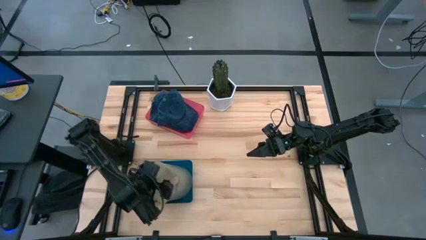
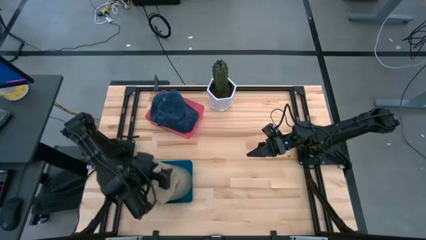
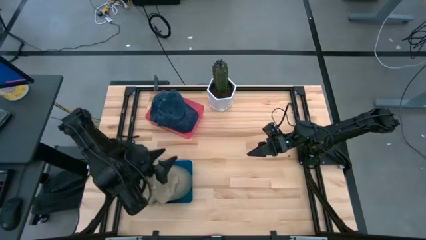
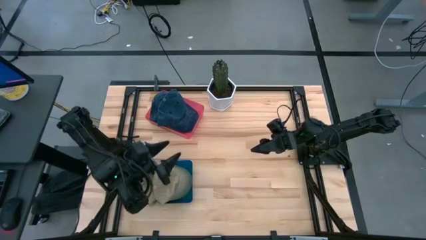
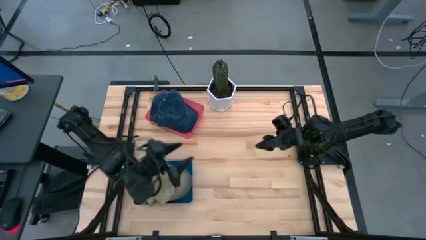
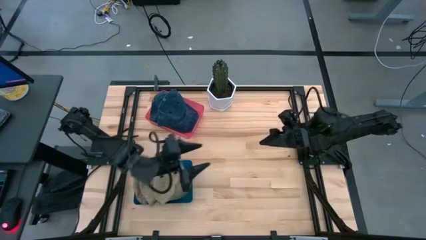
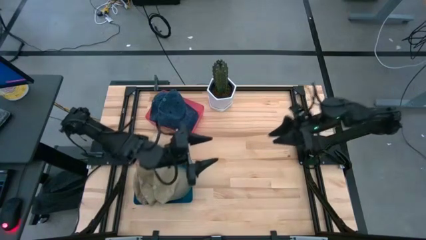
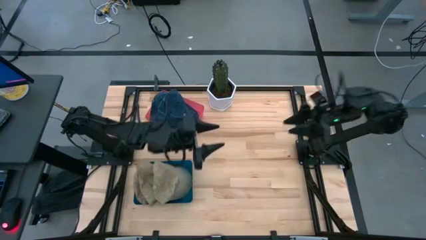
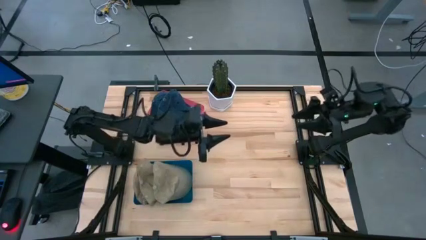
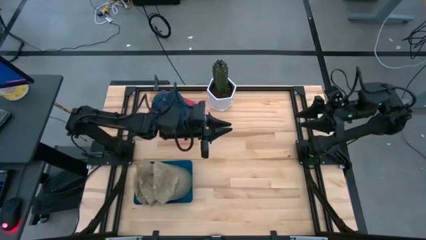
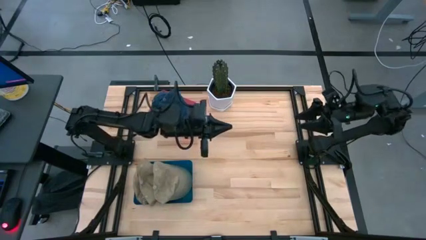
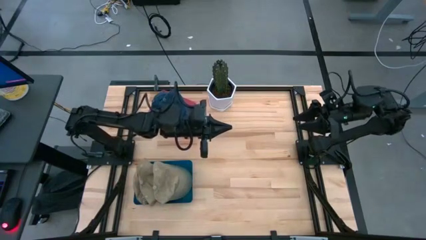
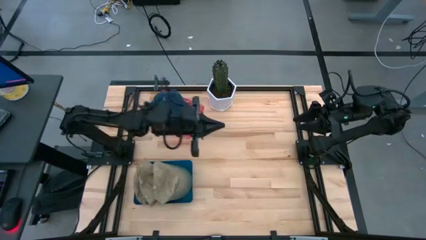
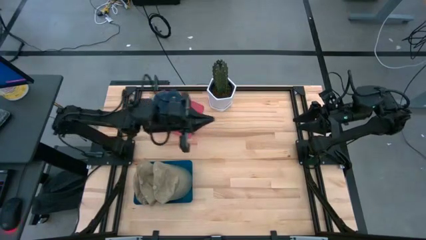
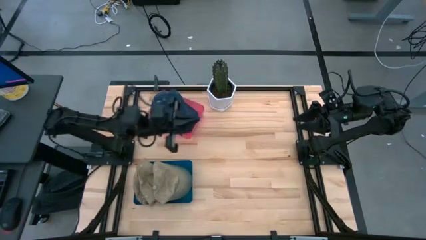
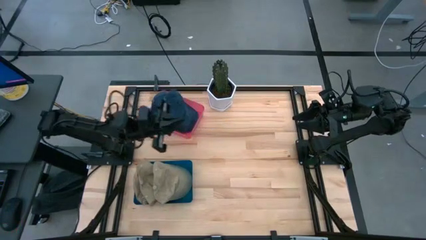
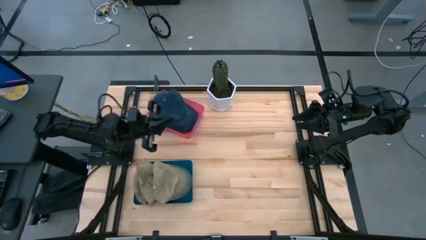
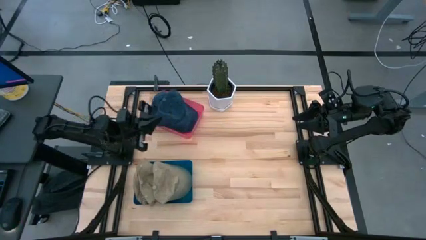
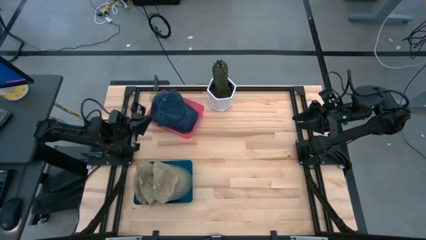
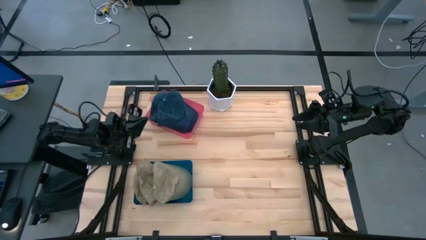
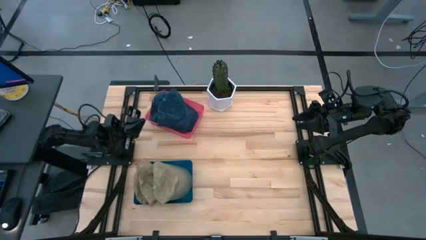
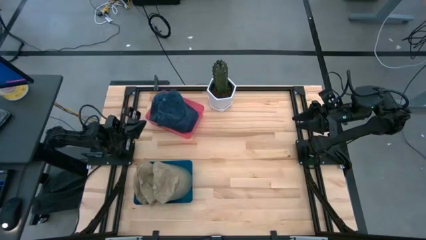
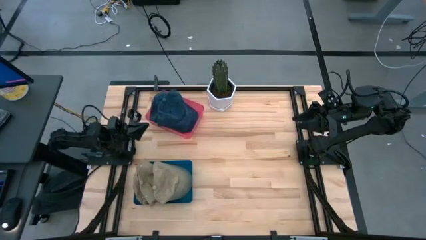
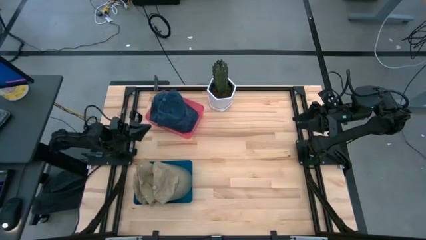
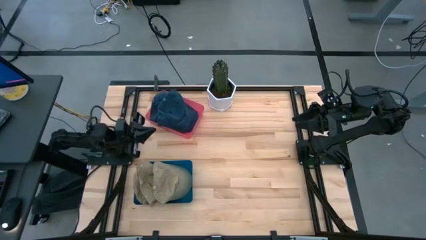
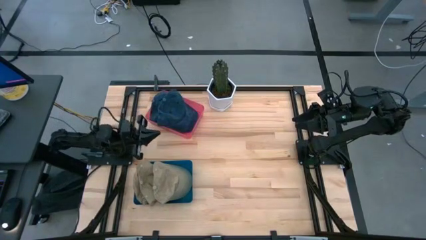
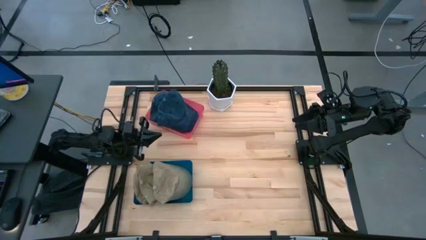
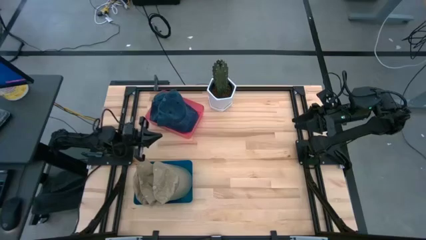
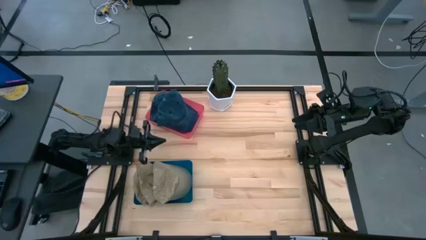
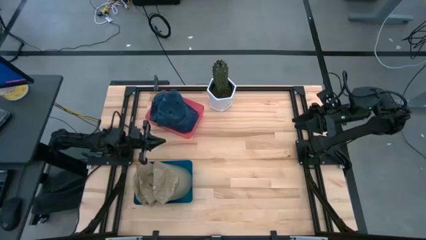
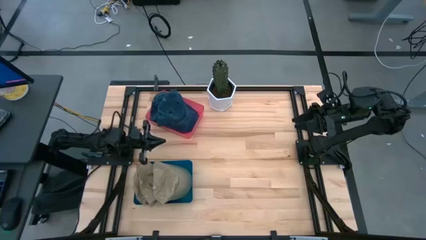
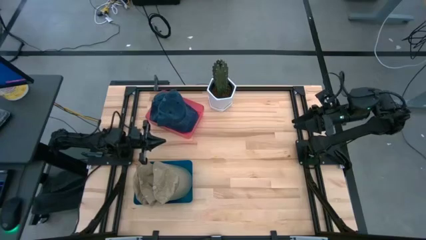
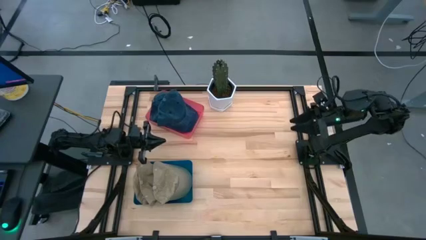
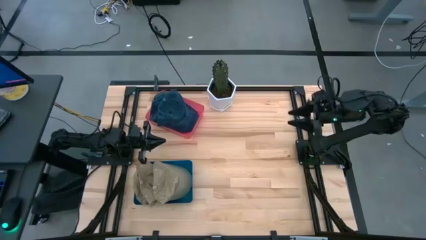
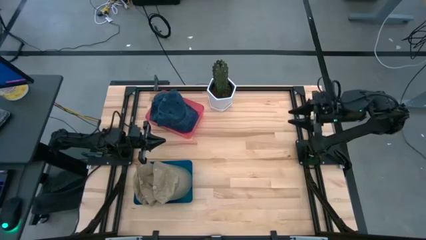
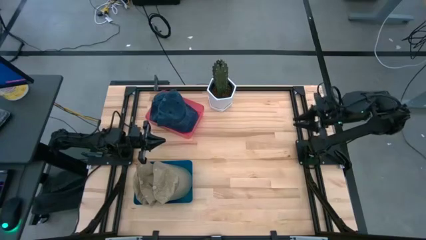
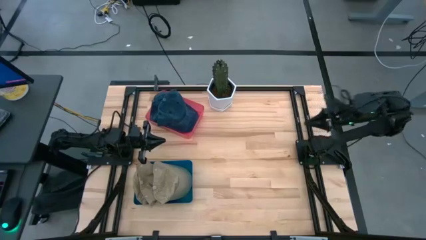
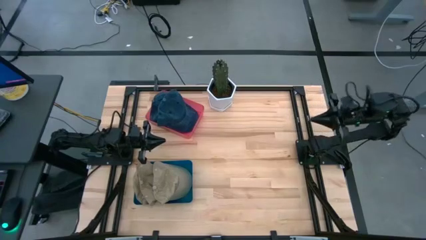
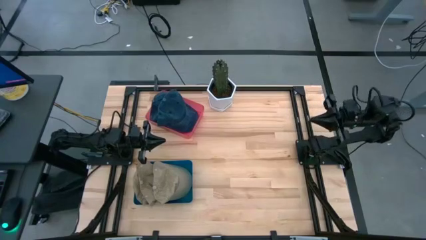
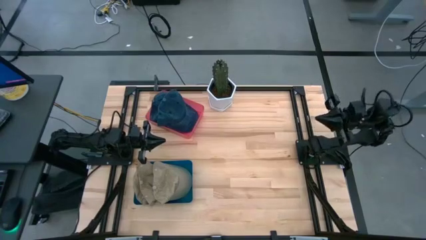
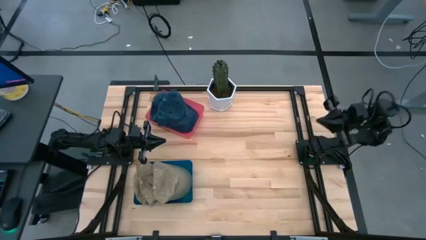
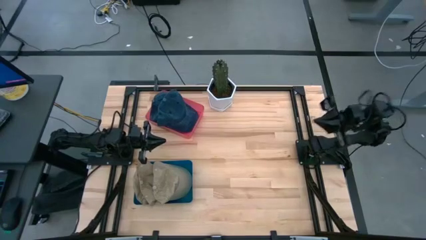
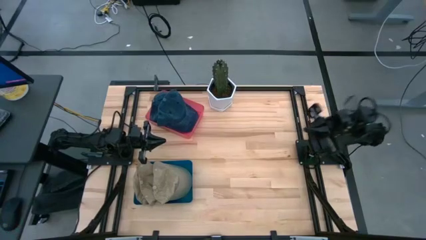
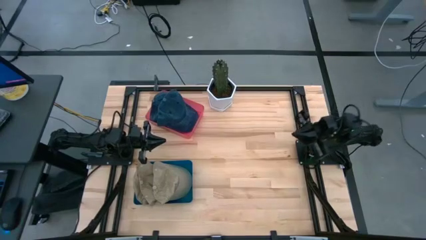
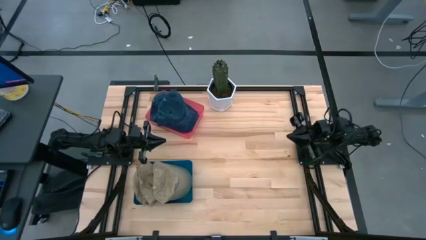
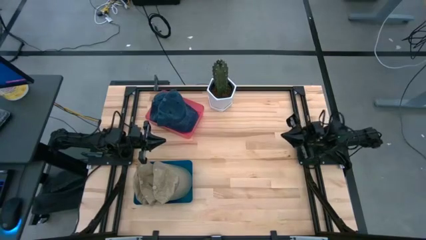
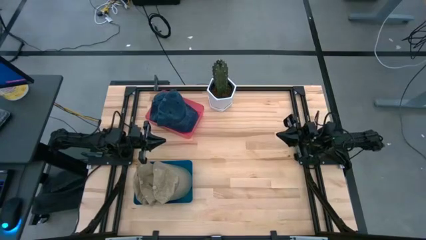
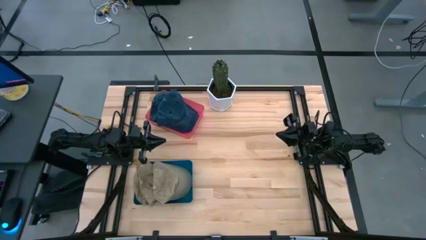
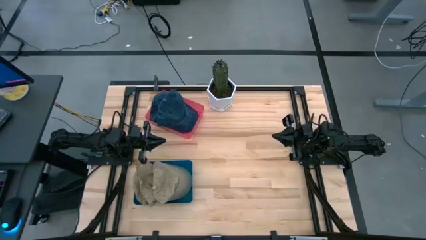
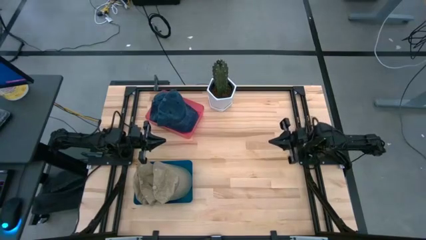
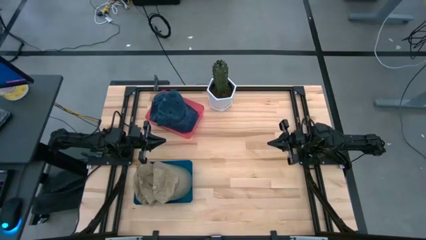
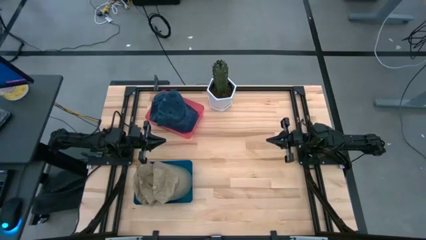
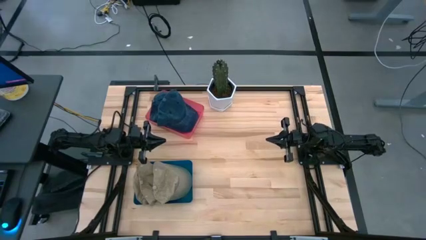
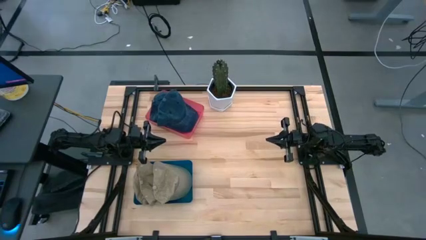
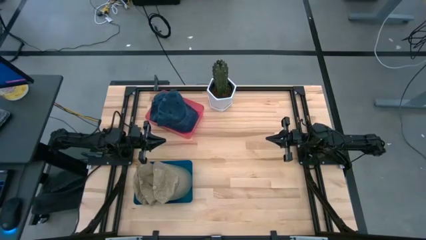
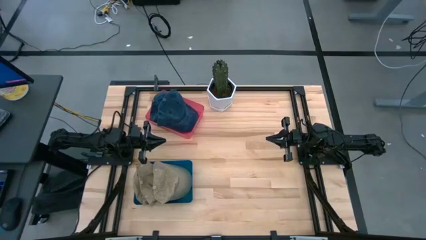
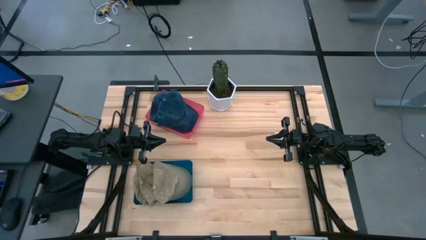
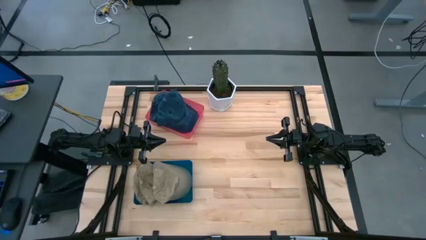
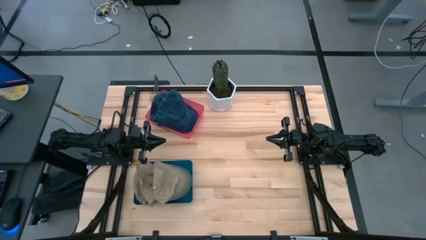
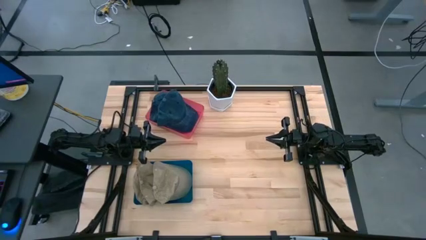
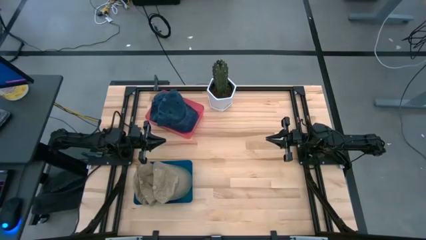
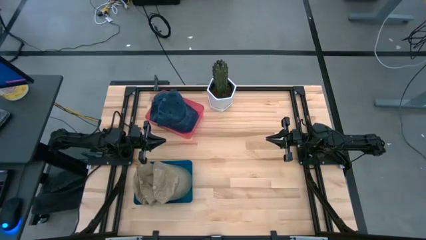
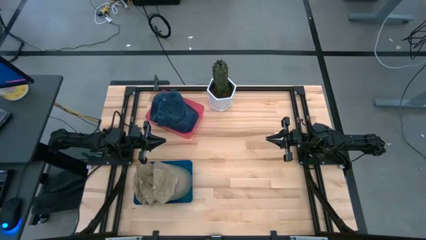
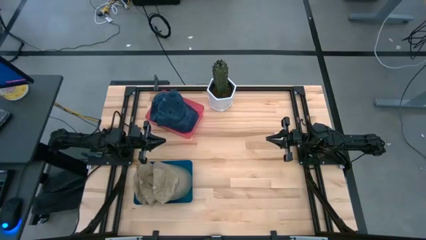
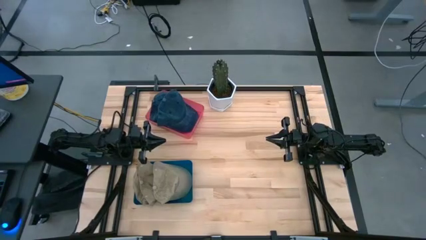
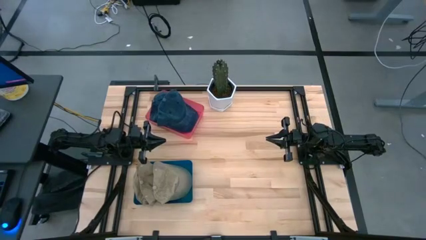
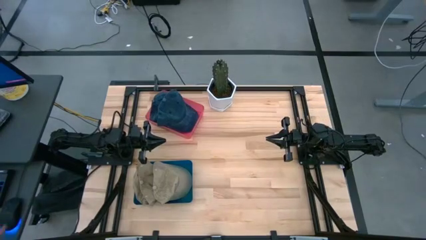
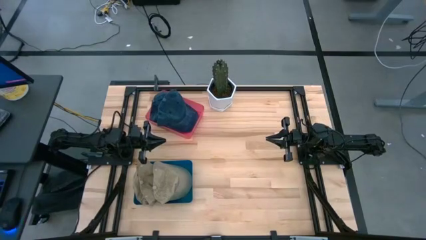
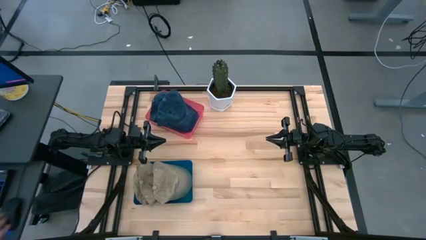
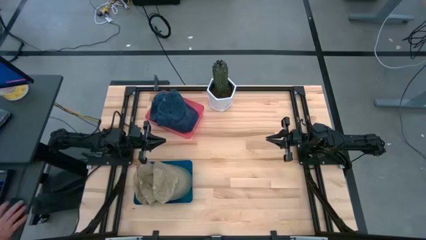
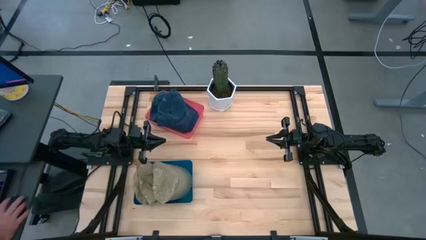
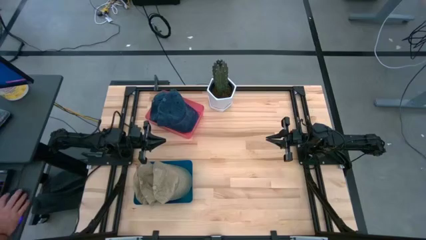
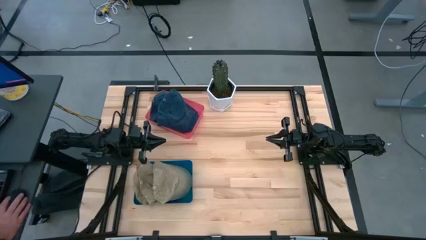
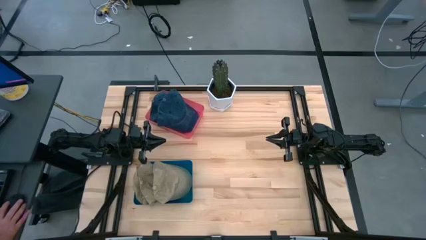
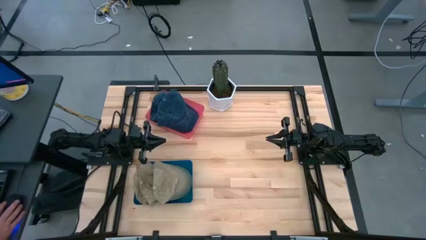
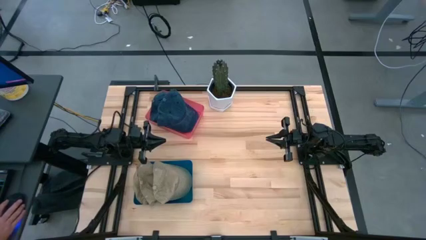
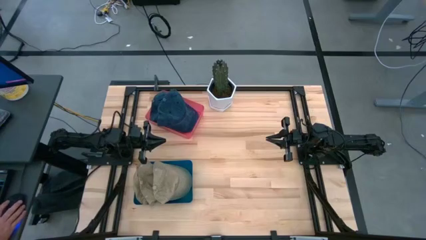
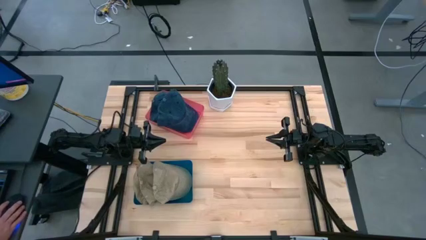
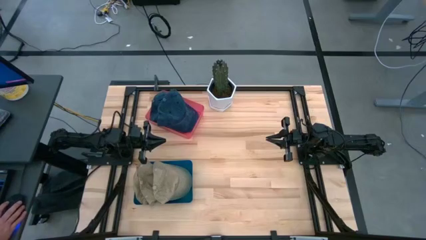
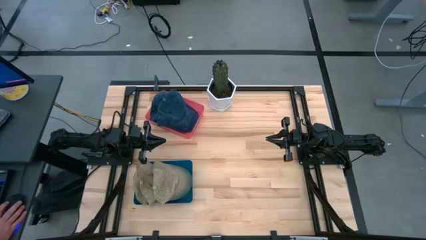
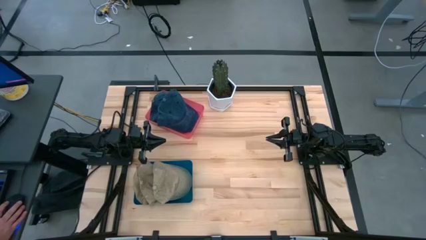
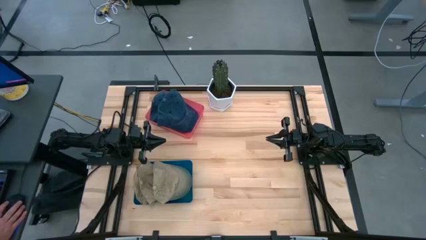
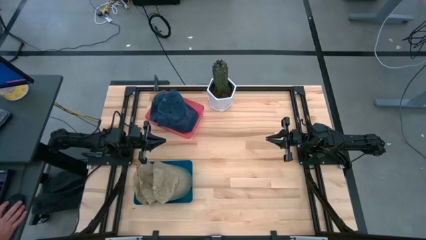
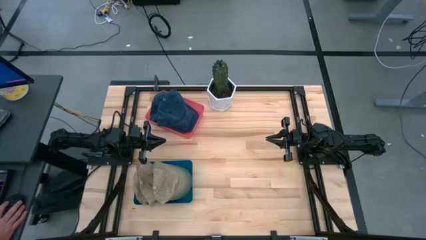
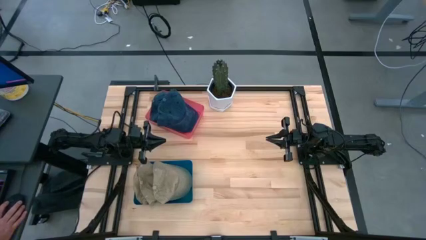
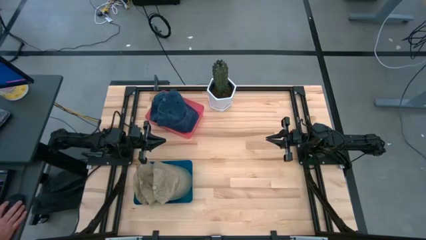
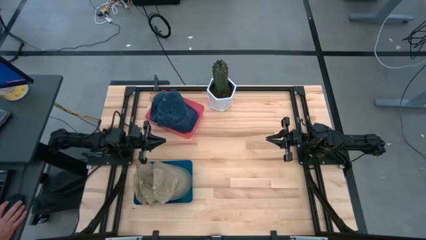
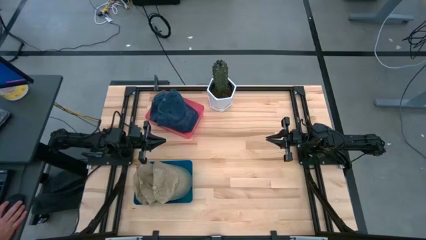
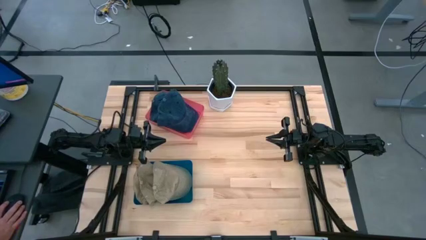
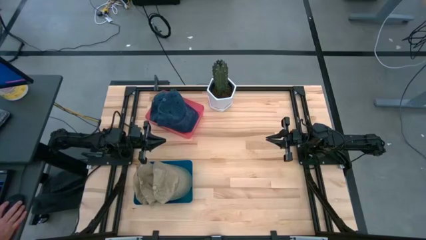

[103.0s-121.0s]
Task: Pick & Place hat
Return to Home Position
